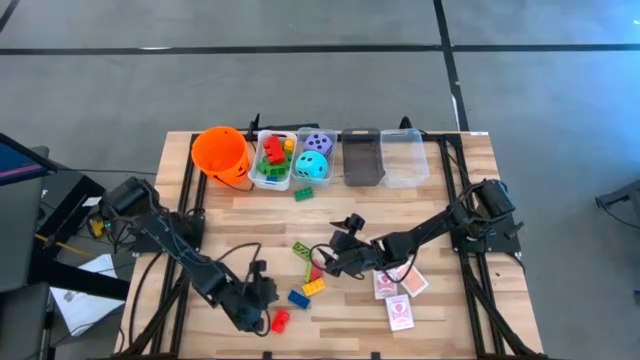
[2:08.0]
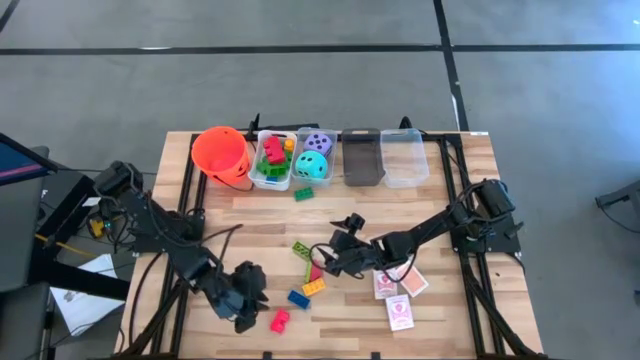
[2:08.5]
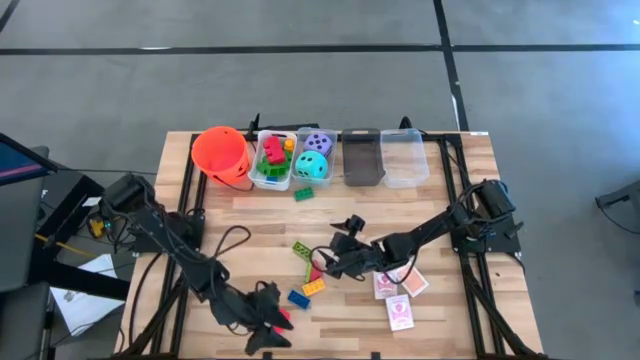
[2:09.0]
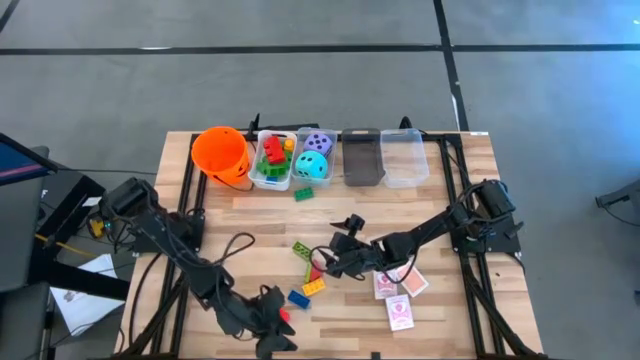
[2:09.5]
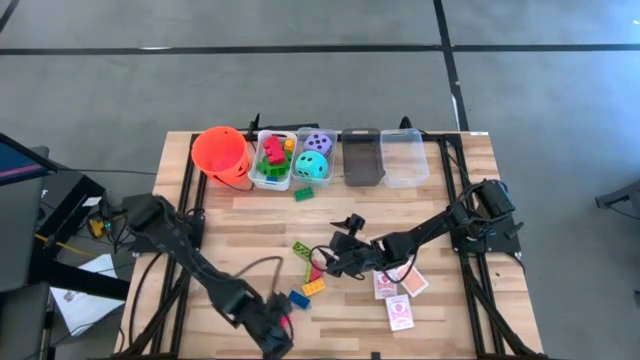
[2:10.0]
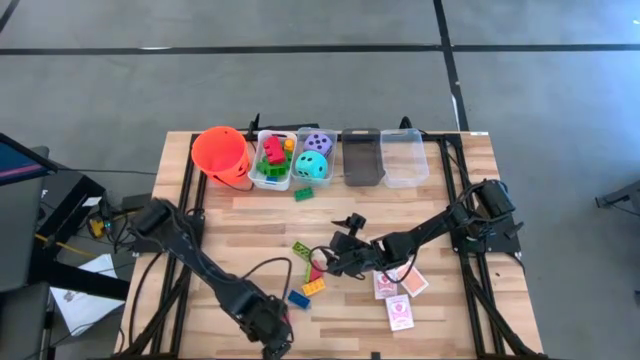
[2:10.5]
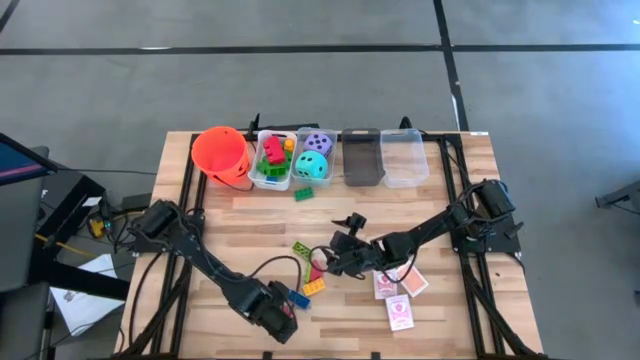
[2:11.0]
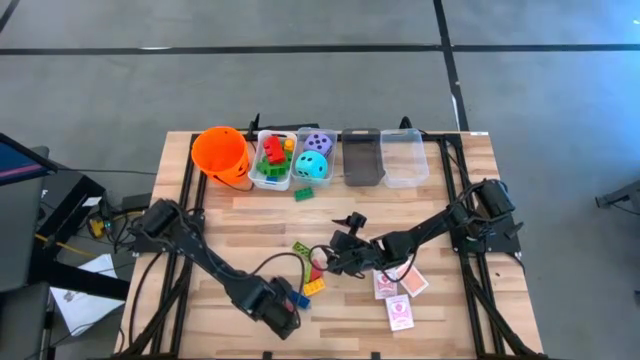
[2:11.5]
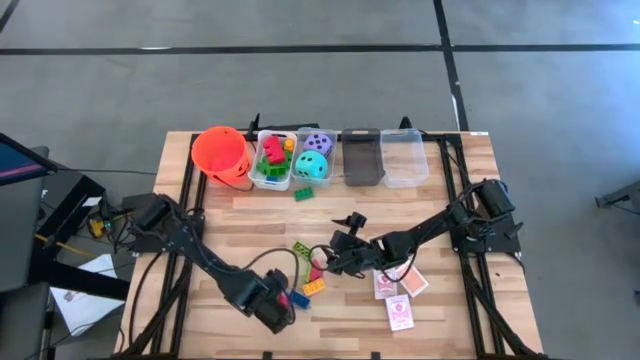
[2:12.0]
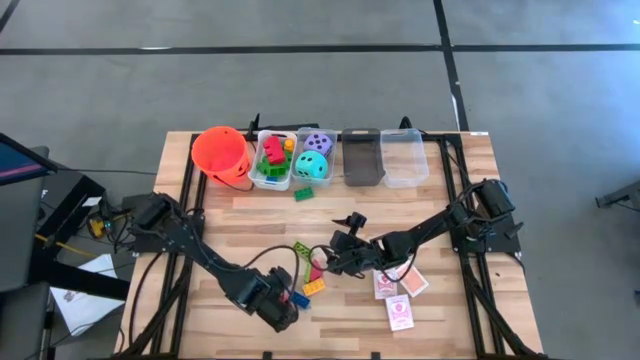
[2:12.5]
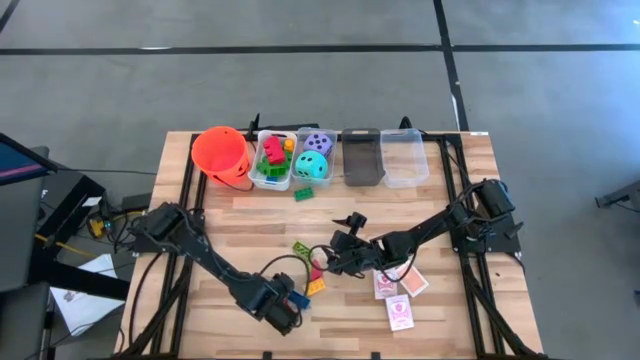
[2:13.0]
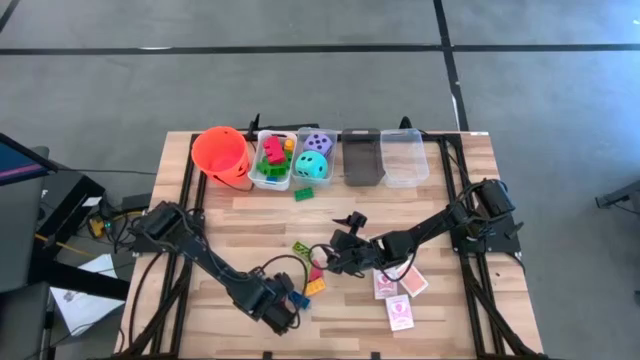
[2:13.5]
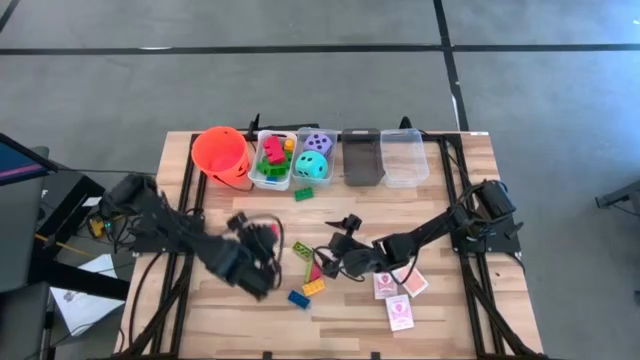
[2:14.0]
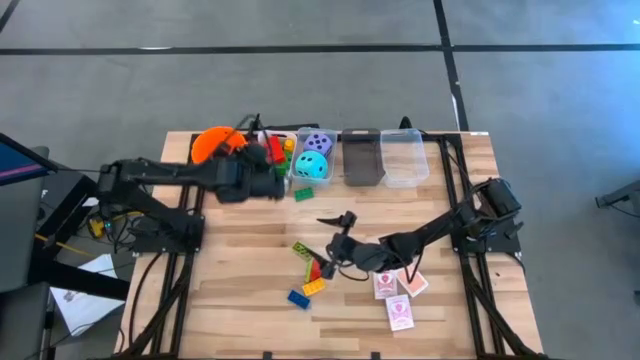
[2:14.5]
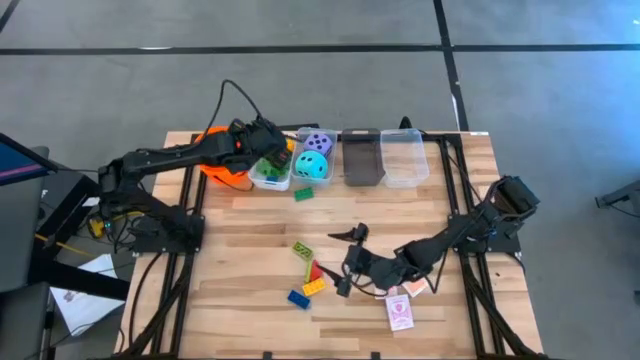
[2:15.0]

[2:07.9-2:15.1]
Task: Pick & Place Toys
Put the large red game piece into the white bin

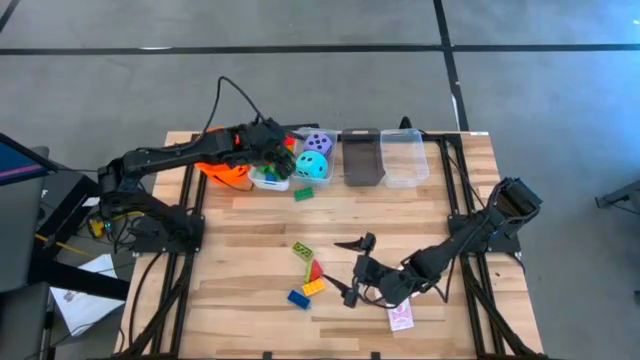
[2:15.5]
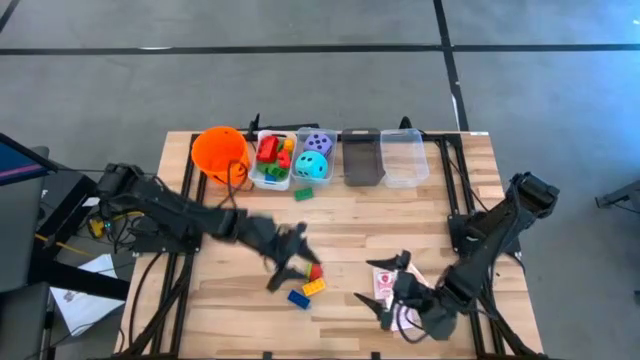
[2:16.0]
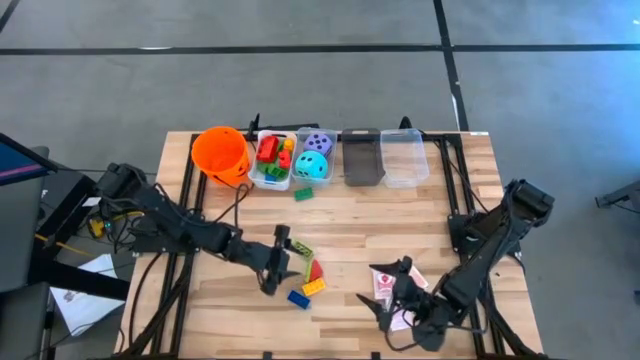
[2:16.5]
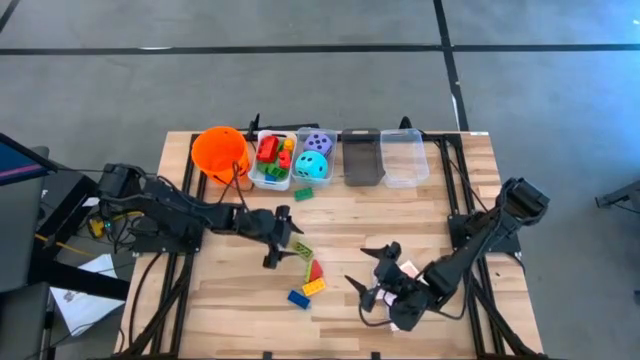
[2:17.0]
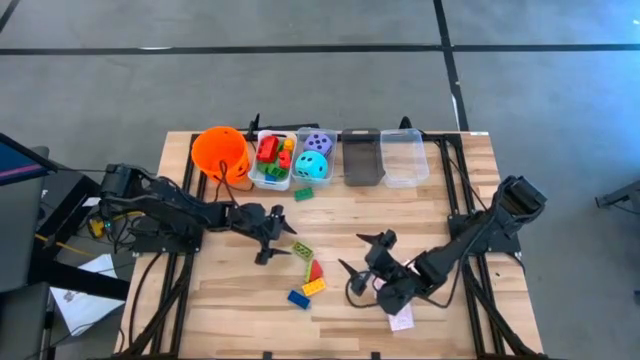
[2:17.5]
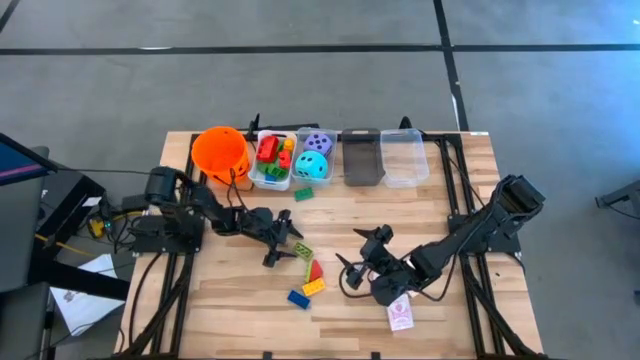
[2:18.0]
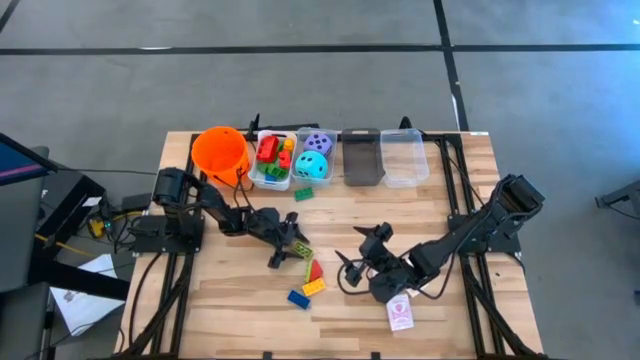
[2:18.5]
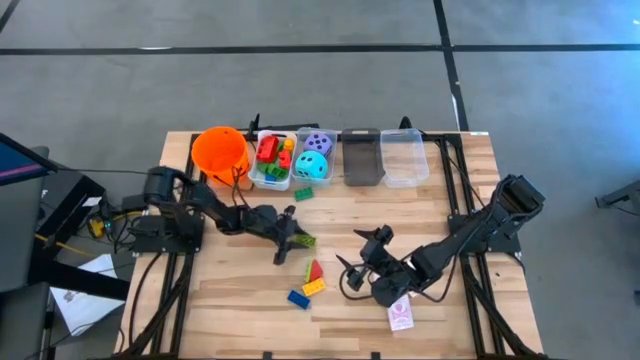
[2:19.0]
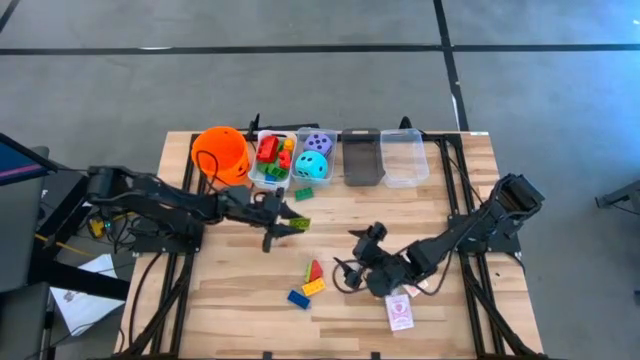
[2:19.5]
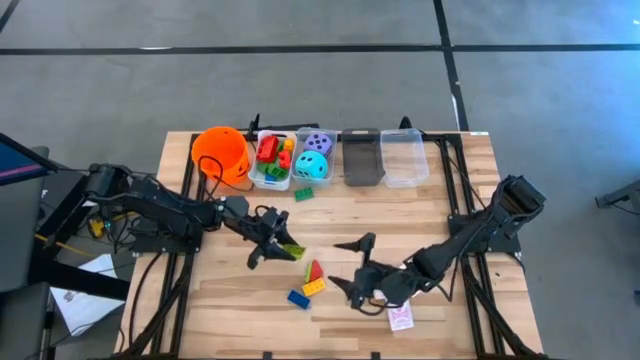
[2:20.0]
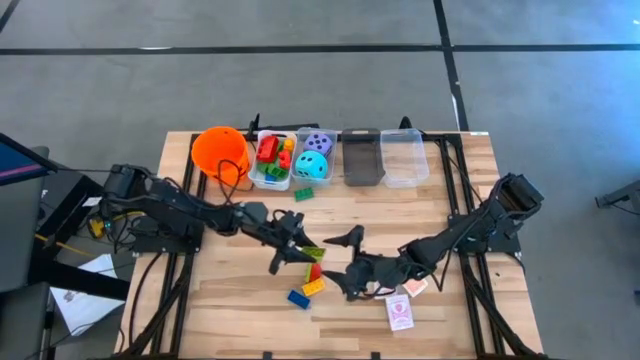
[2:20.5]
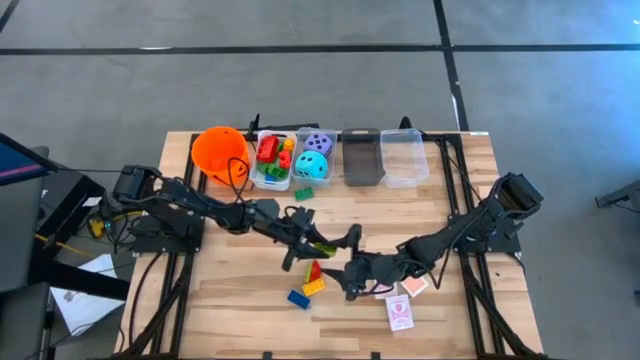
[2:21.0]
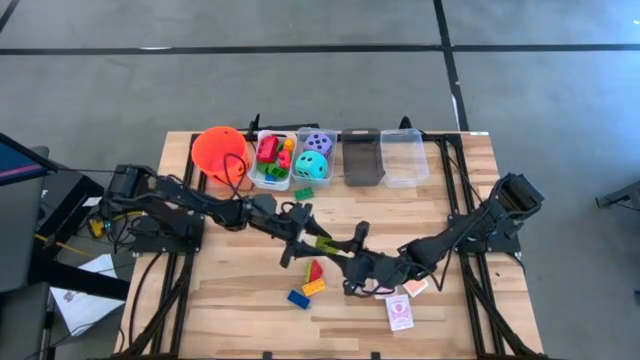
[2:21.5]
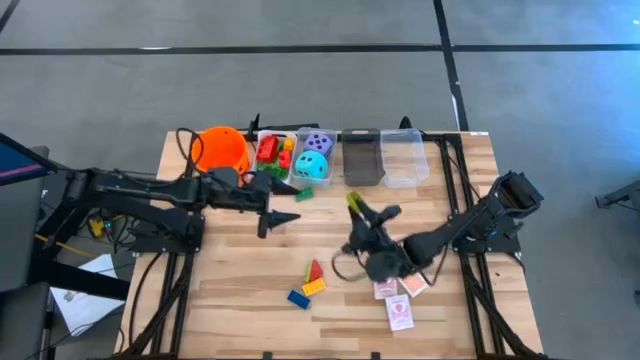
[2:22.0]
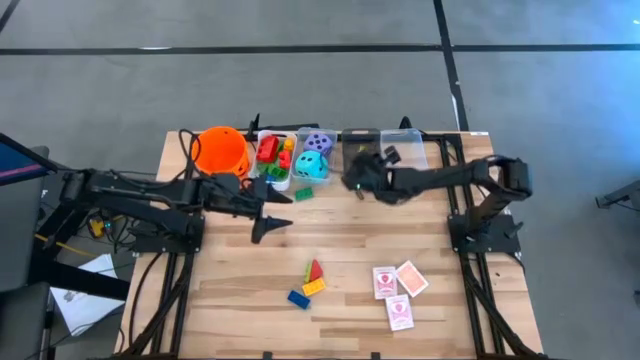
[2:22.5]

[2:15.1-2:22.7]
Put the small top light green game piece into the black bin

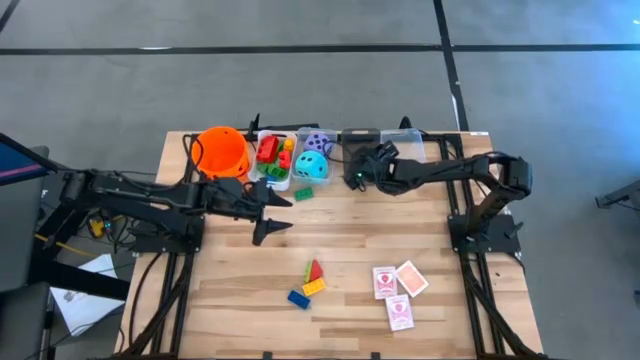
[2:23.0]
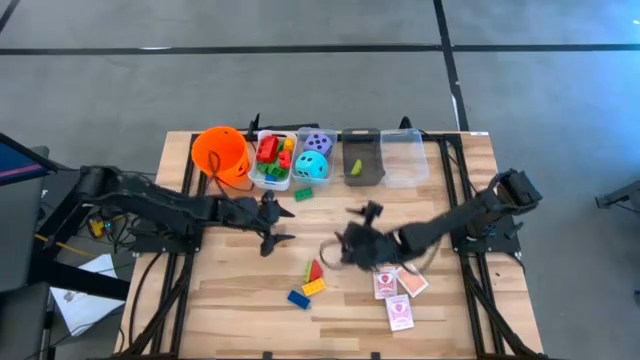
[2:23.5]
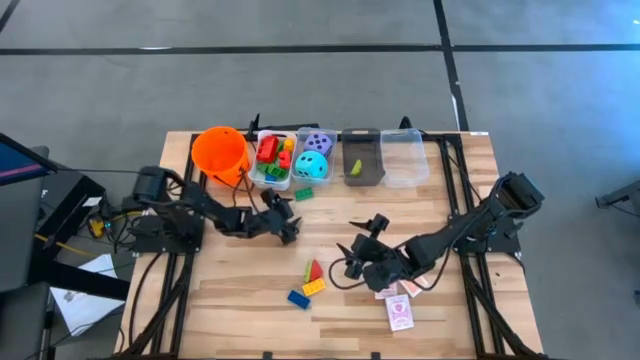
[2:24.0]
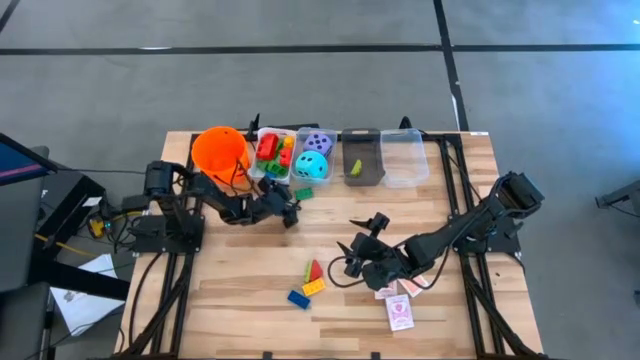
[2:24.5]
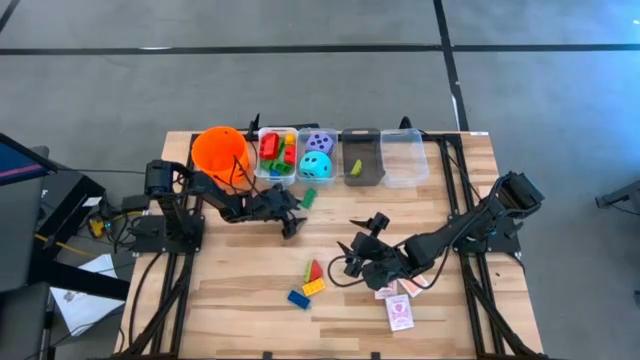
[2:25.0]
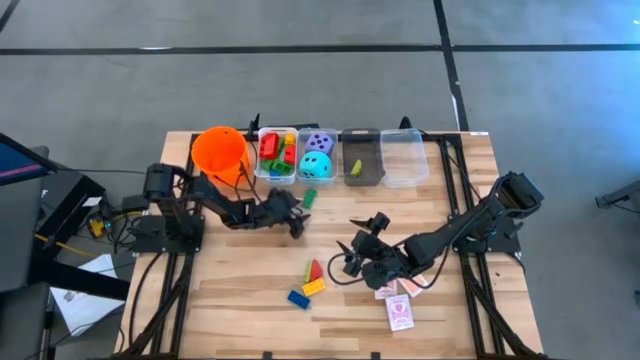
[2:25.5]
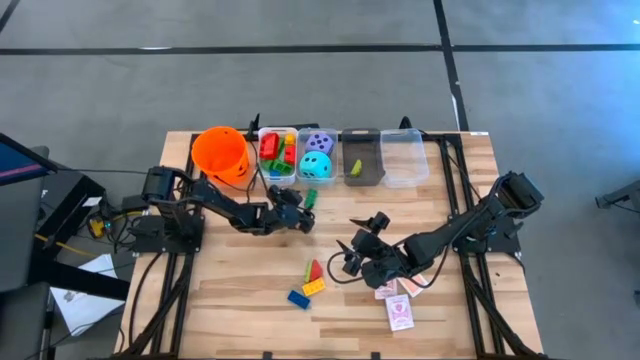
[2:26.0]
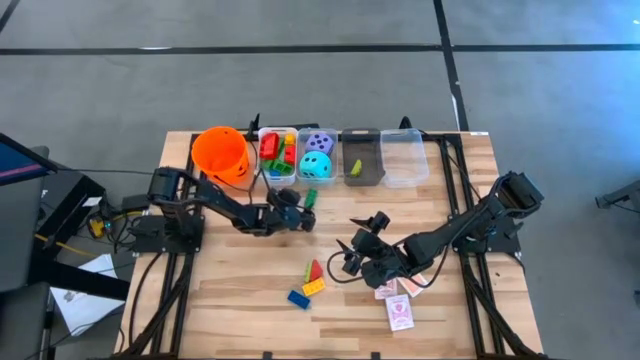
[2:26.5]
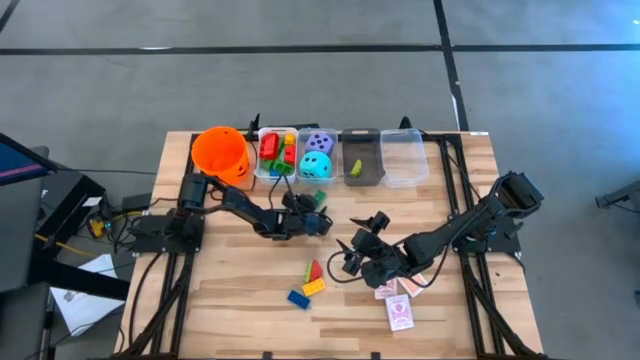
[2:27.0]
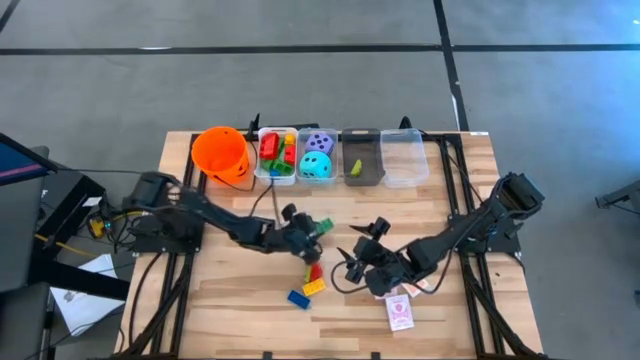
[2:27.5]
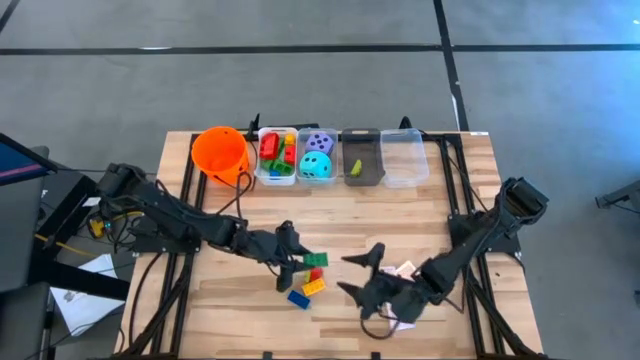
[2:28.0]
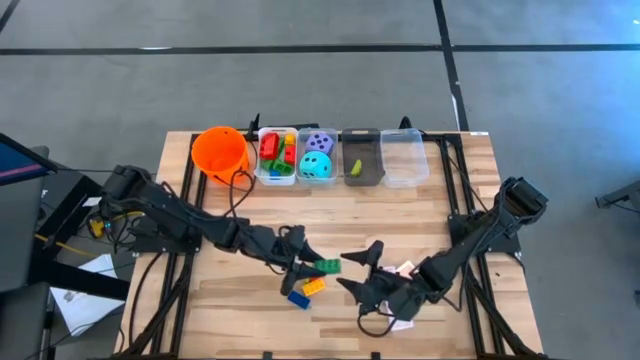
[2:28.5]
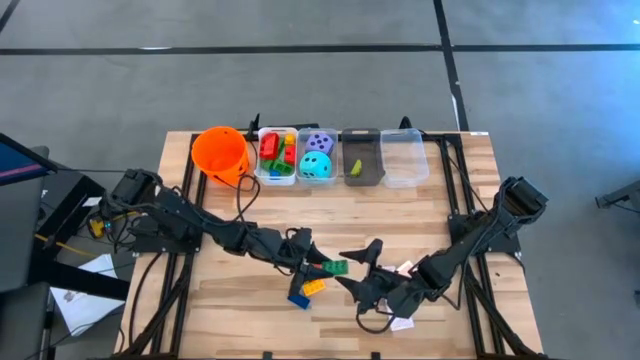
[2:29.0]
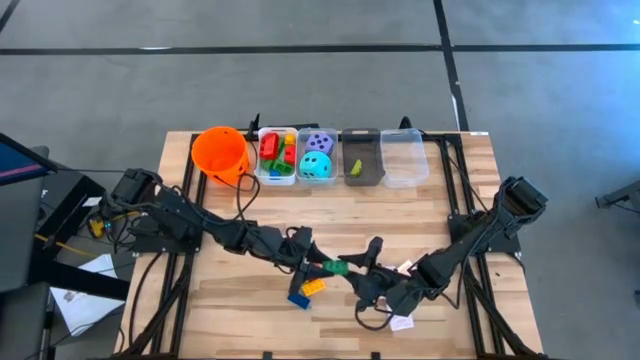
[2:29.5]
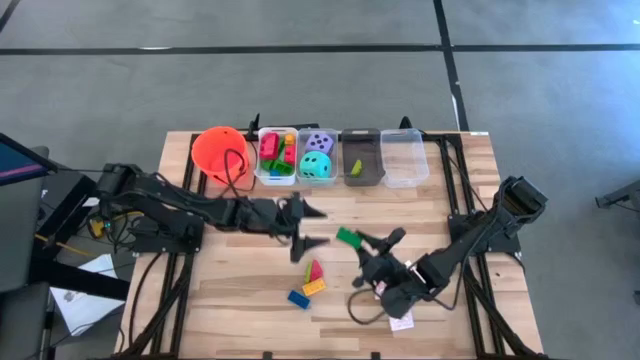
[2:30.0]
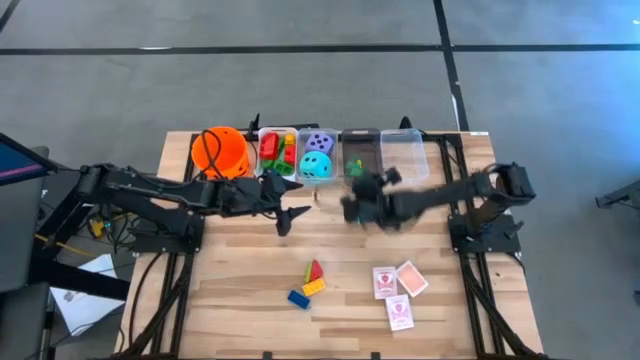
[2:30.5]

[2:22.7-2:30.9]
Put the small green game piece into the black bin
